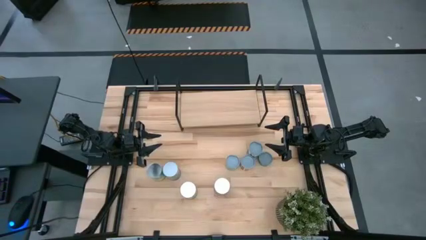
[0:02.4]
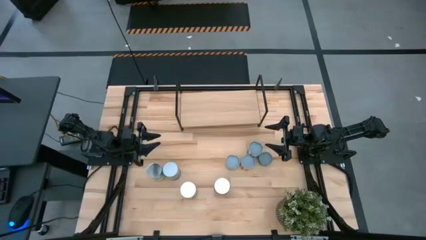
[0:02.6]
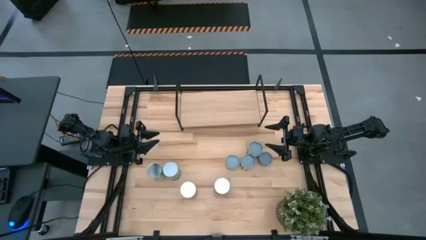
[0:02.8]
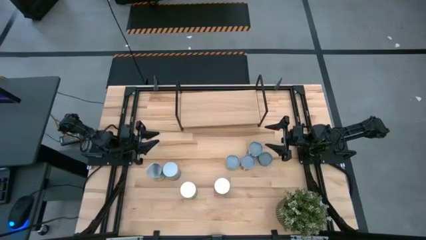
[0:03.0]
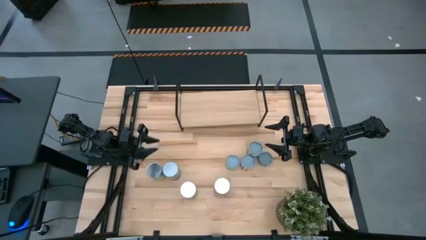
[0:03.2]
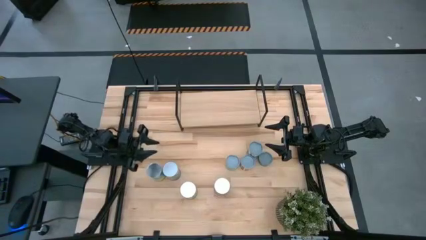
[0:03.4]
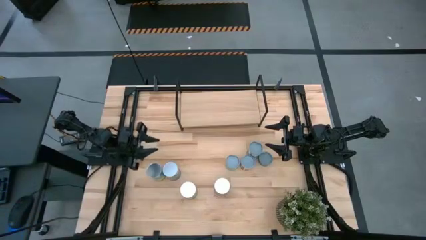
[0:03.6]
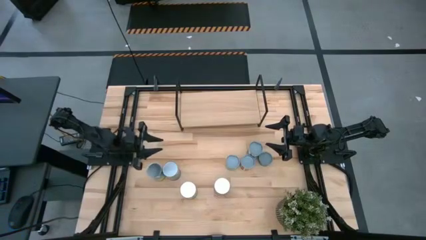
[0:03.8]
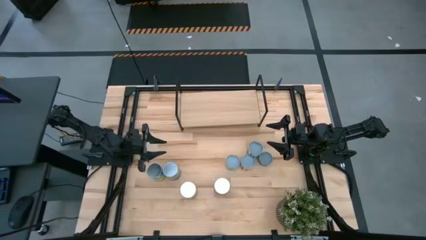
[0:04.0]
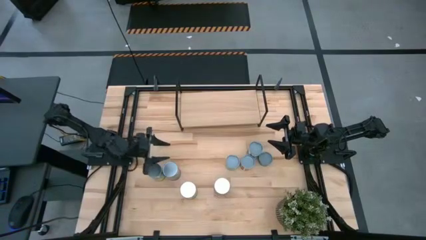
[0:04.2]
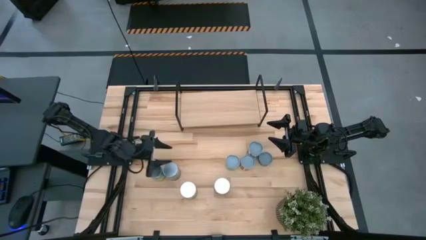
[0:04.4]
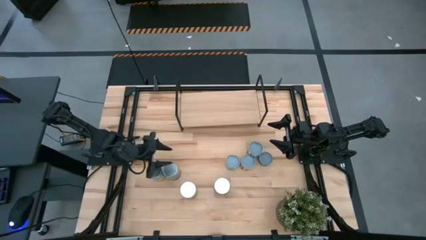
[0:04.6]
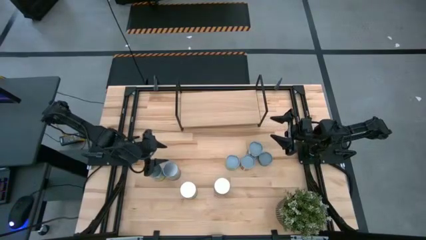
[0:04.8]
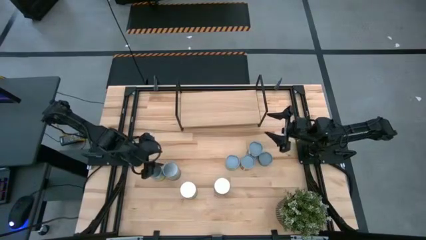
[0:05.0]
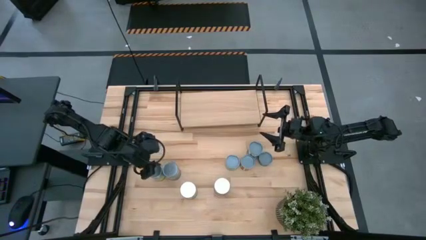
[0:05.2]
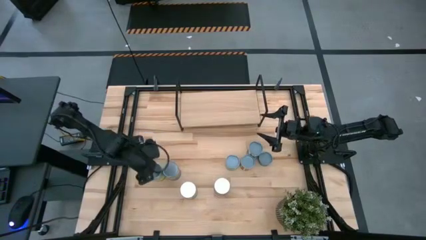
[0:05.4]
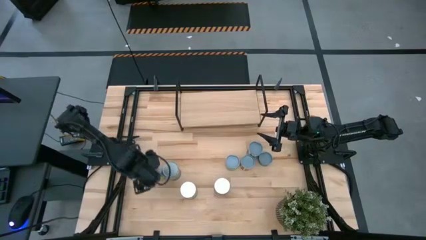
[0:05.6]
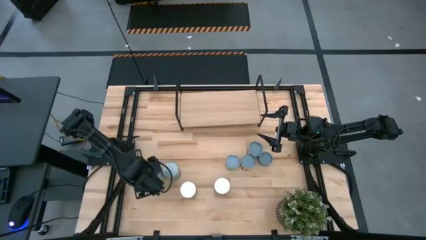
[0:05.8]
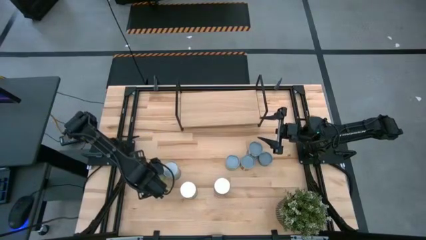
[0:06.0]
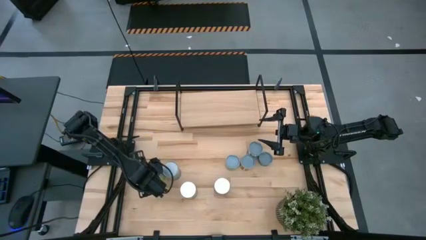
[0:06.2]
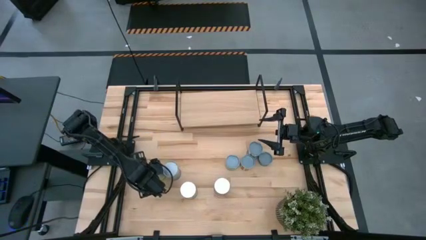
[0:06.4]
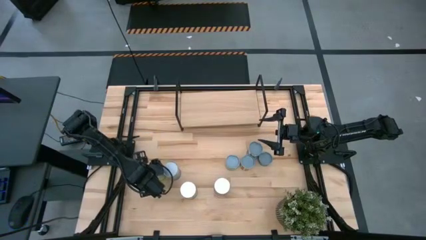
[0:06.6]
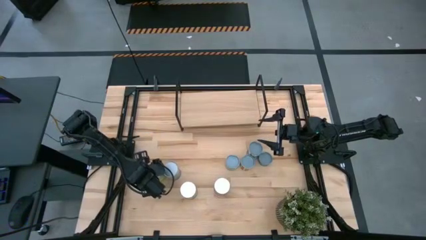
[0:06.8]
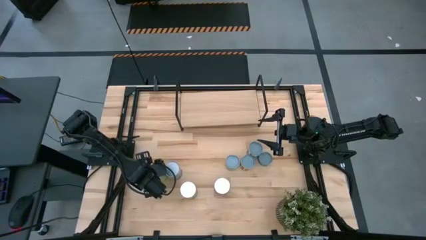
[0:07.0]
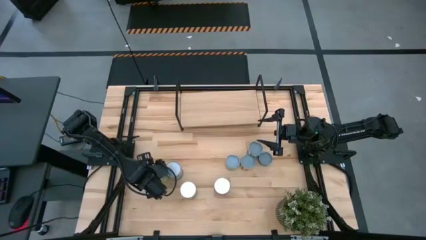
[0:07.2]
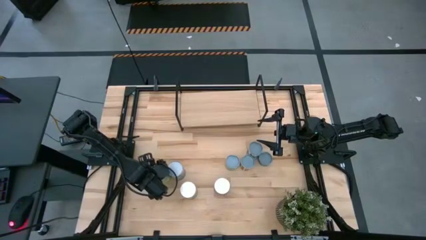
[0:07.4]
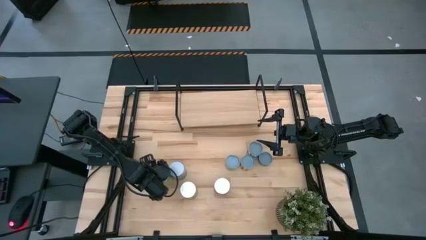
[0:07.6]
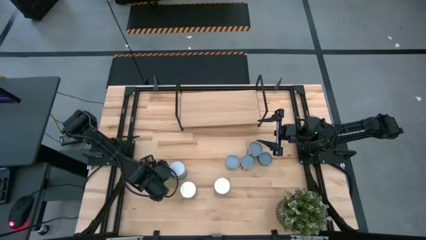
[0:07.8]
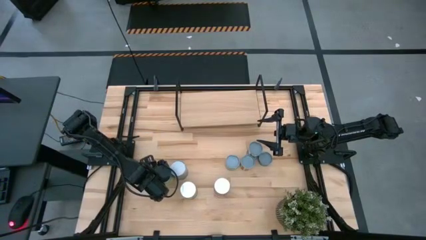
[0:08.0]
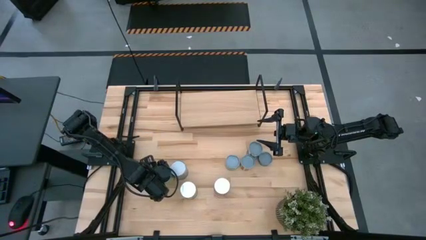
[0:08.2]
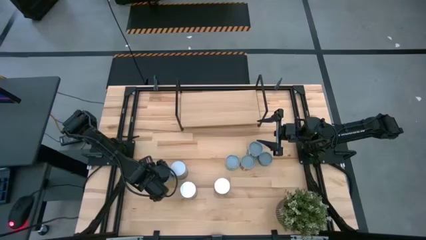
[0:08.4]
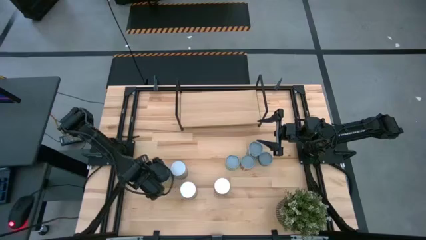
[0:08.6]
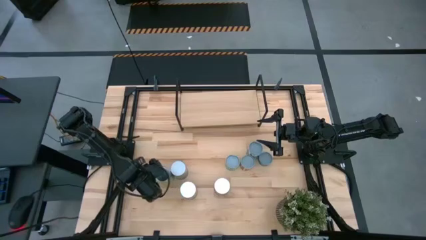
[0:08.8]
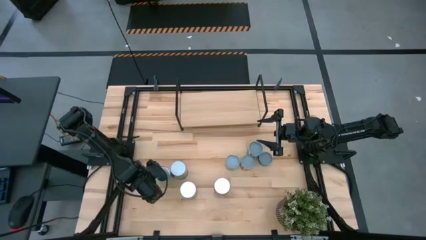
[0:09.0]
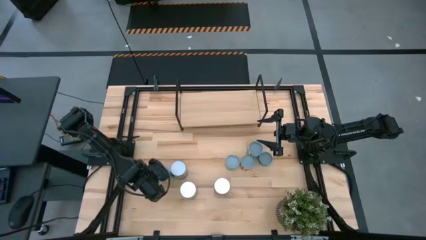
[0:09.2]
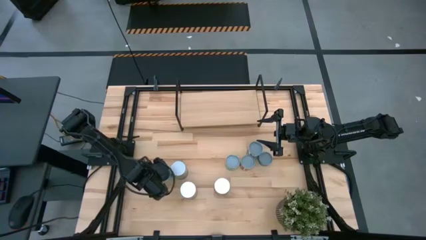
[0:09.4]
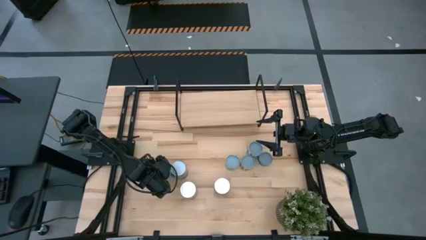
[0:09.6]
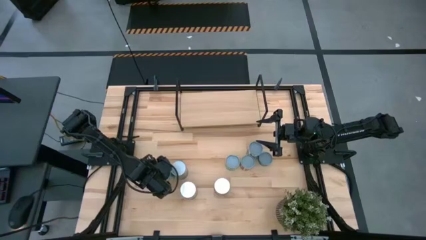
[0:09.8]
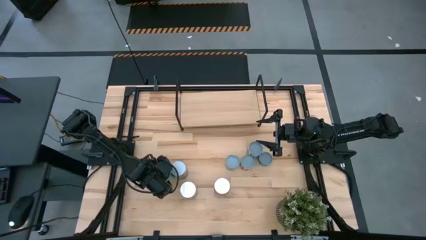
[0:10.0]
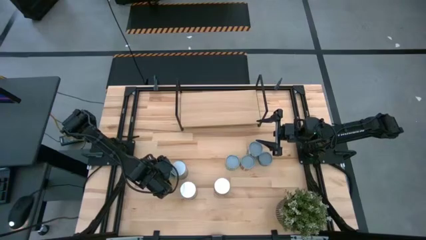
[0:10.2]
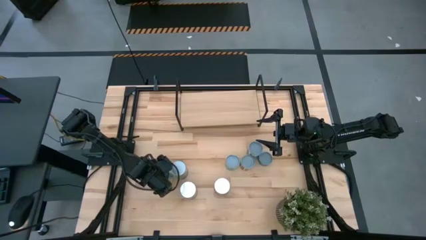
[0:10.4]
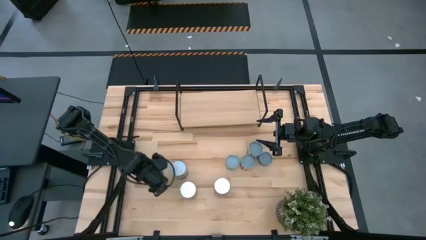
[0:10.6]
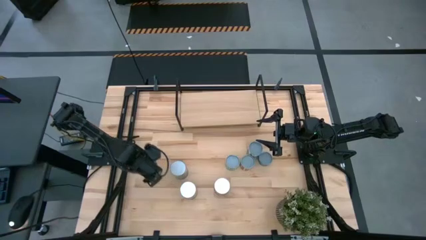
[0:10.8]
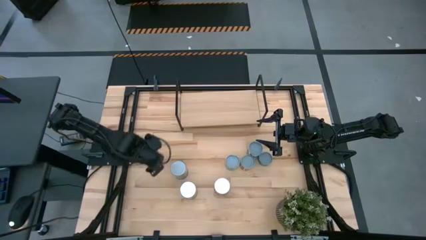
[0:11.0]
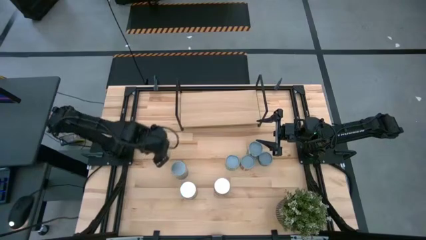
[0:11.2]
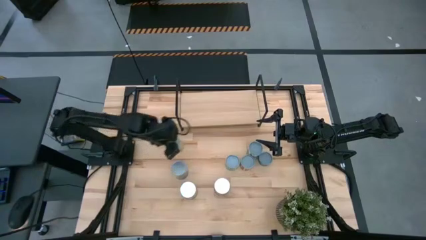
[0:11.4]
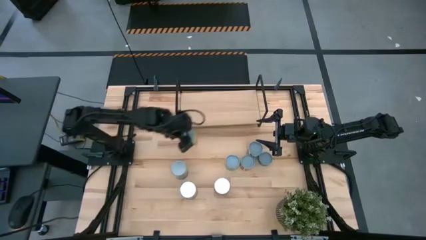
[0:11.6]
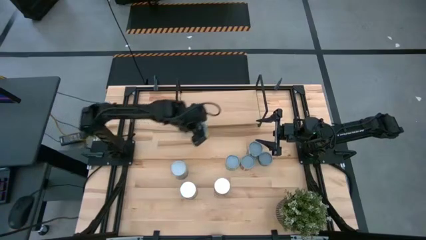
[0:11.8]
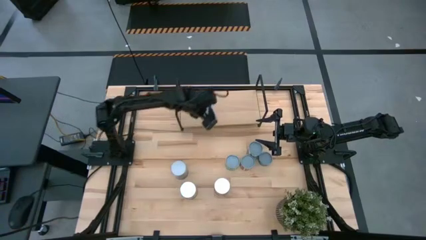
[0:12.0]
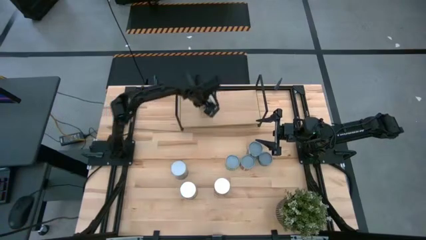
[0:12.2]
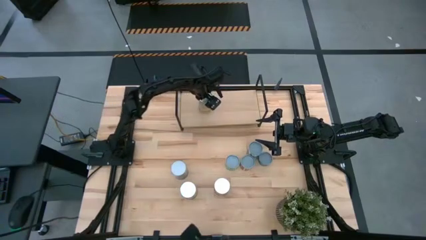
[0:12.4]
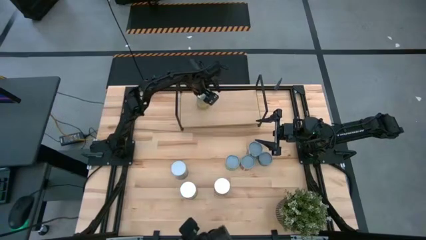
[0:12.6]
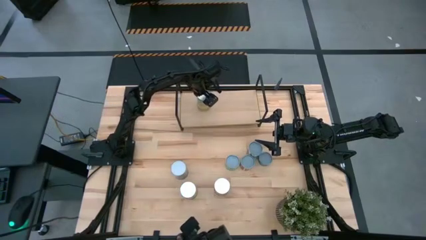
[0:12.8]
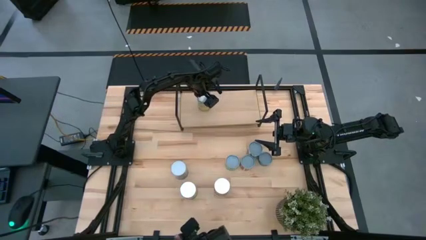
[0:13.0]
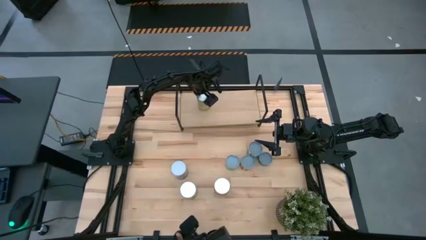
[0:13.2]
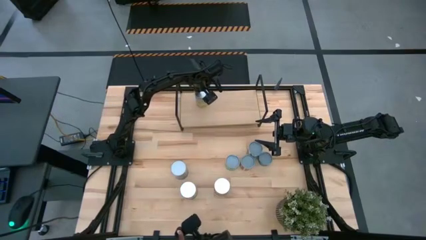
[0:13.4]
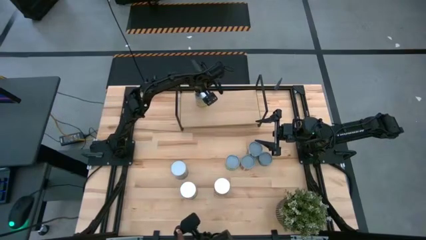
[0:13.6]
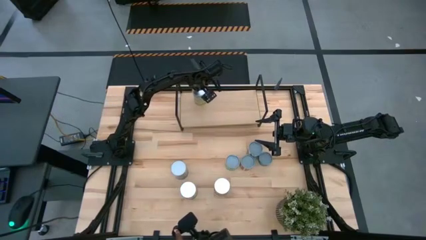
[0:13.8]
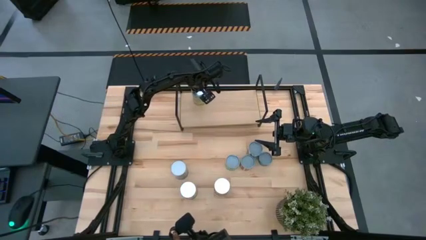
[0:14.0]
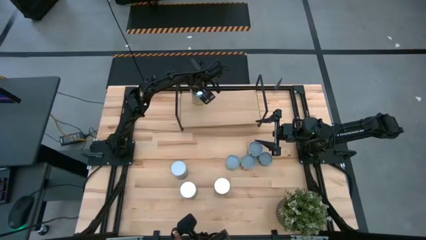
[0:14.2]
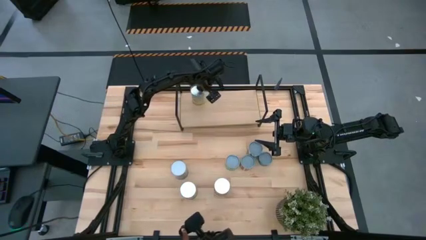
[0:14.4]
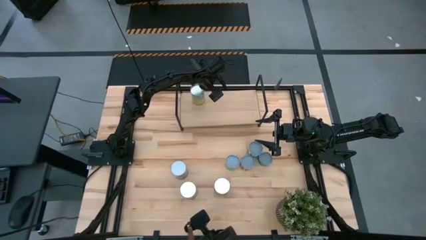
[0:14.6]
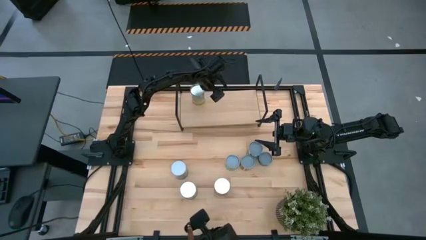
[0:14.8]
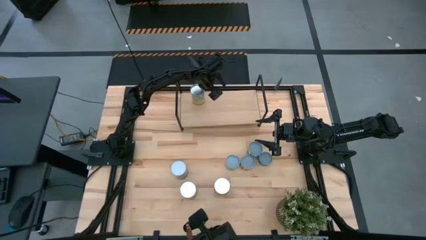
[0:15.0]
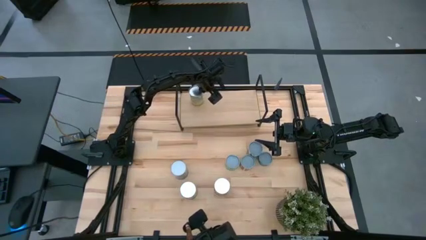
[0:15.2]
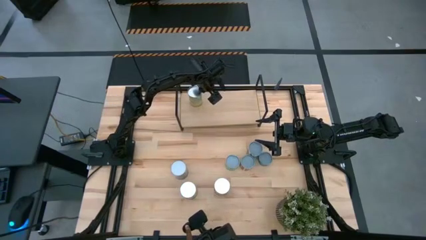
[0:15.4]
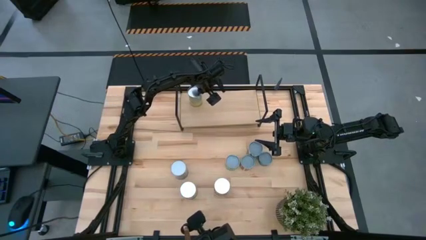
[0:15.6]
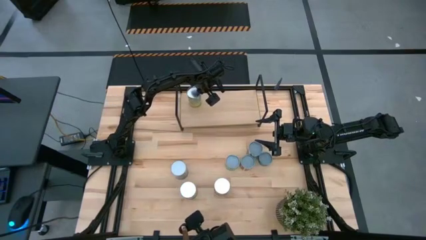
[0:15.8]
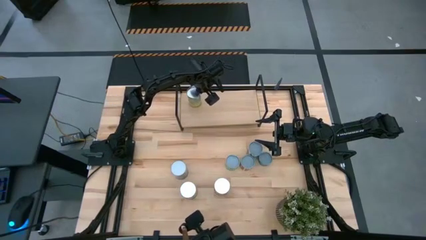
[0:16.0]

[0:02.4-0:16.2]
Task: Pick and place cans onto a shelf
Put the canned carrots on the shelf
